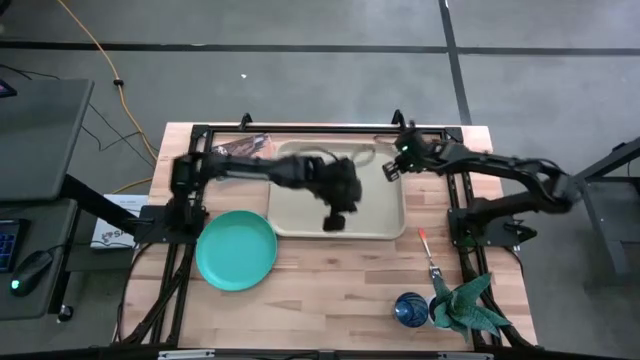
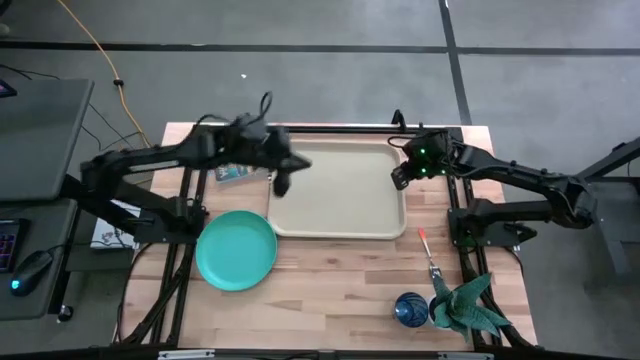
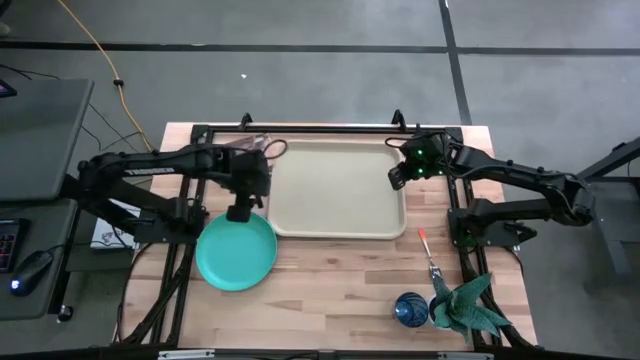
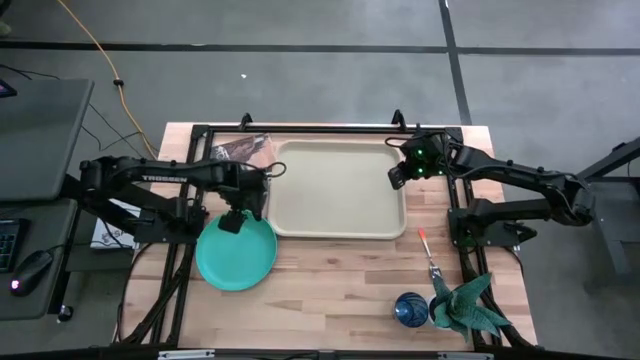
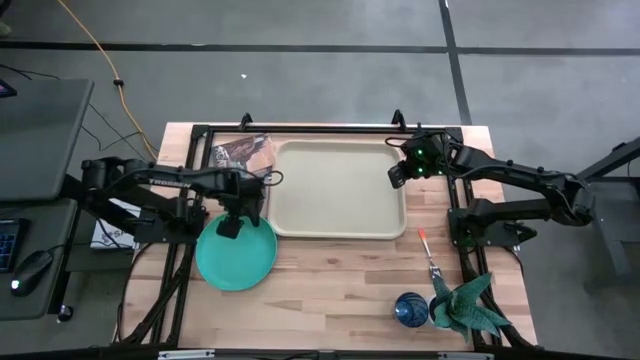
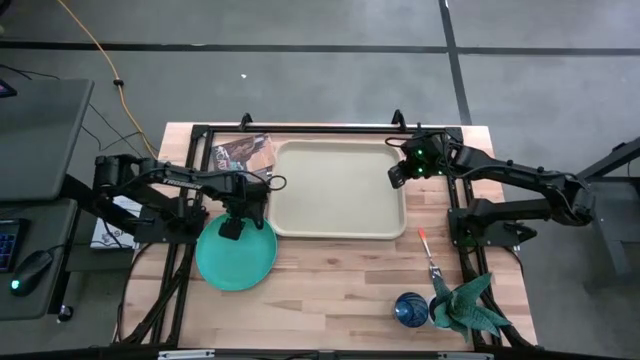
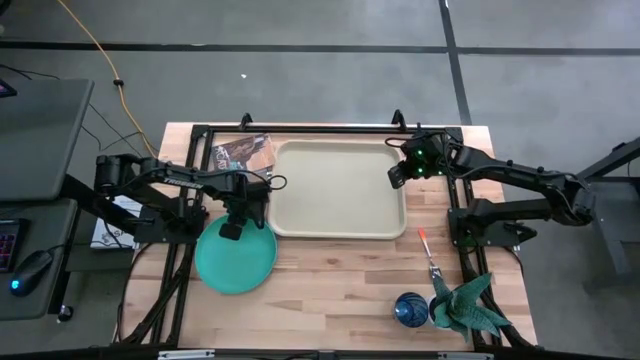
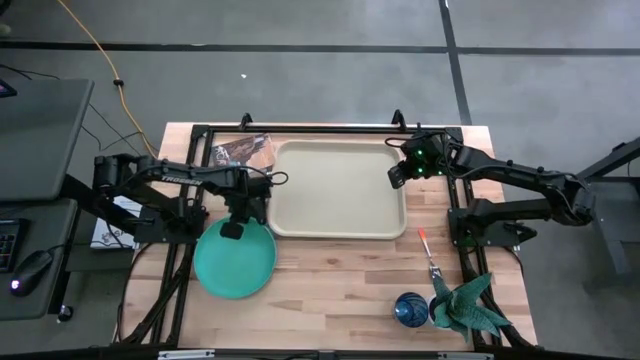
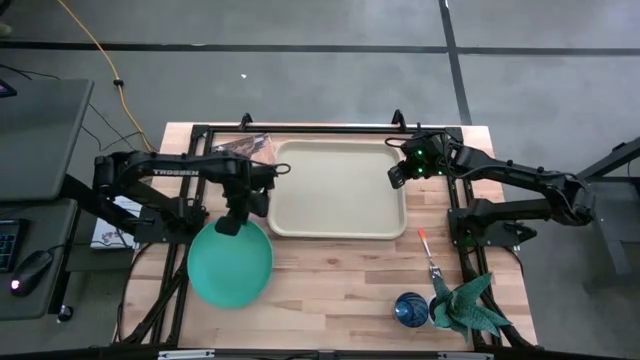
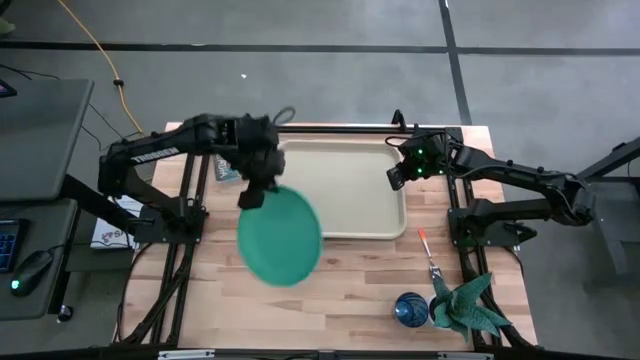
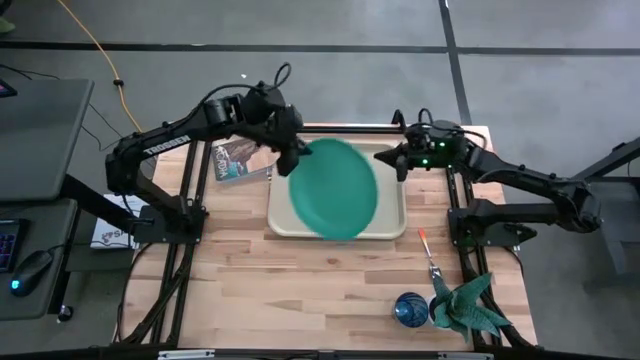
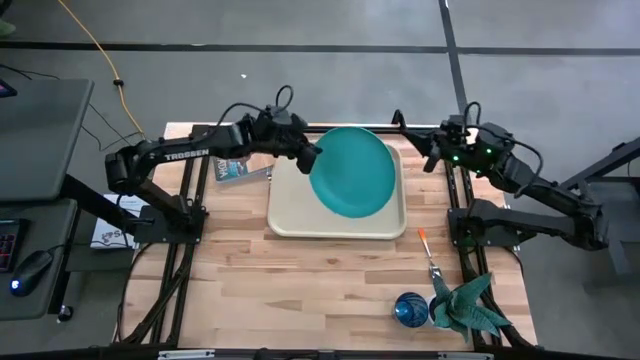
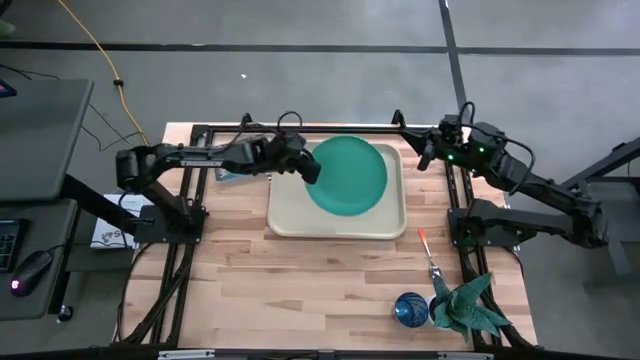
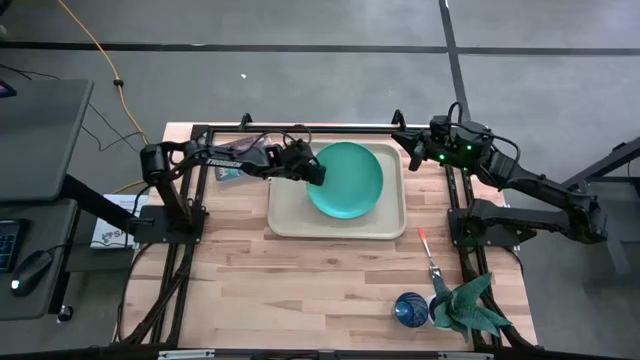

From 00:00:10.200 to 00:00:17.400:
Task: Pick and place plate/cup/fork/spoon on tray
Put the blue plate on the gray tray

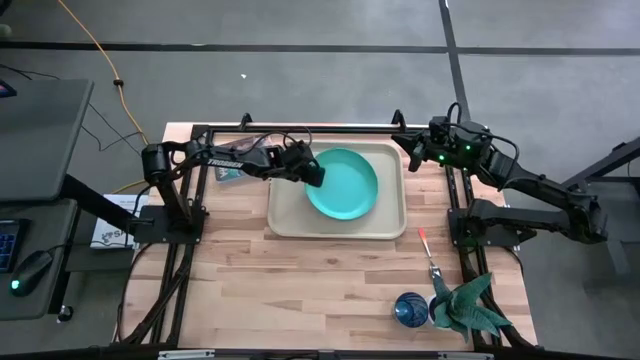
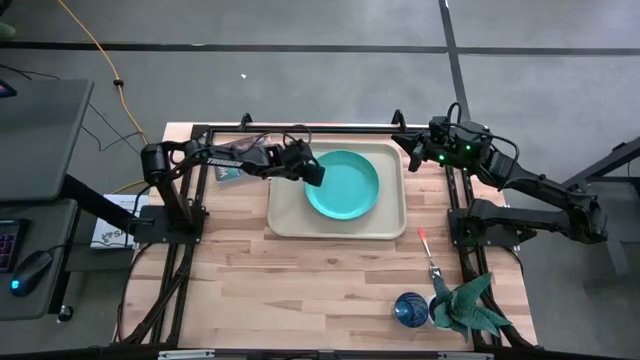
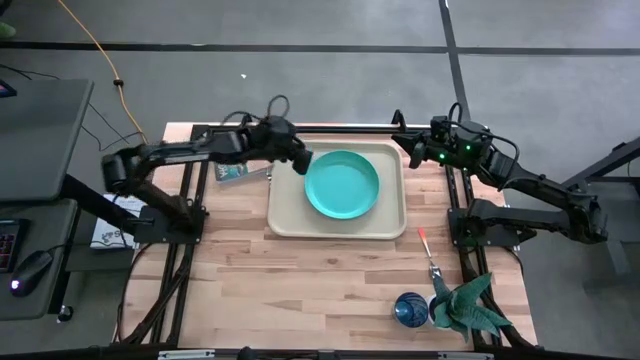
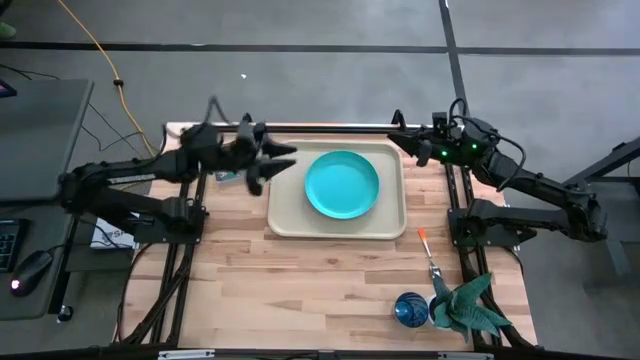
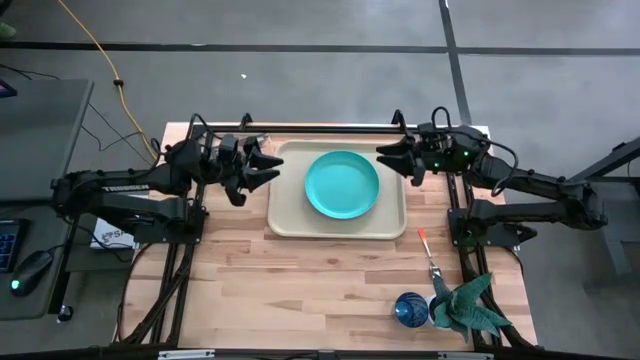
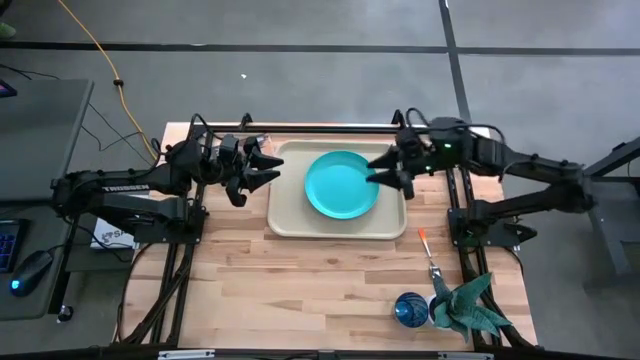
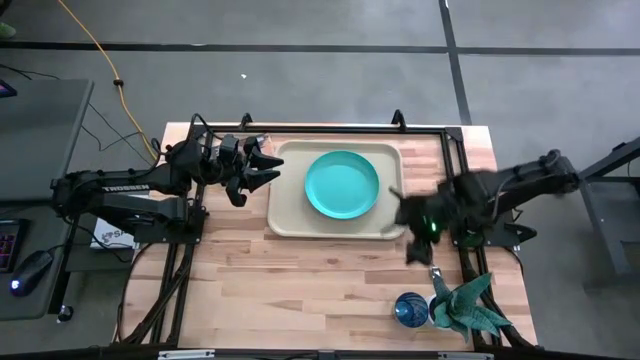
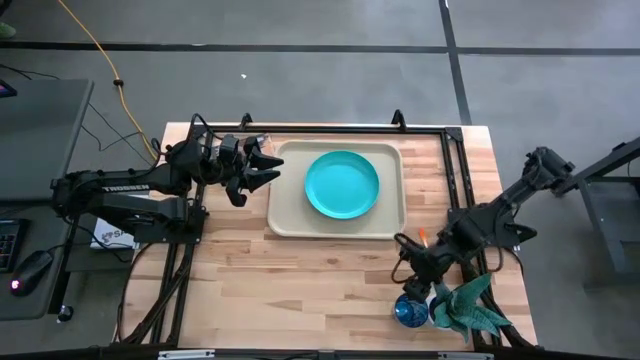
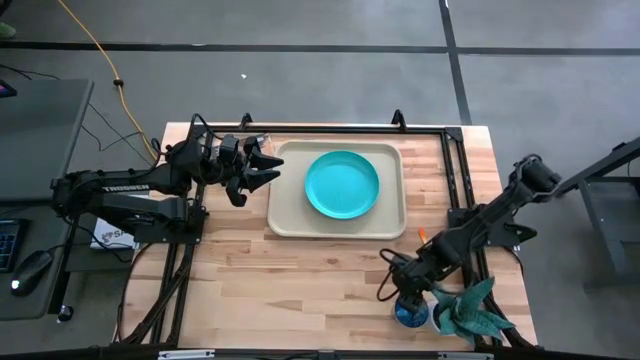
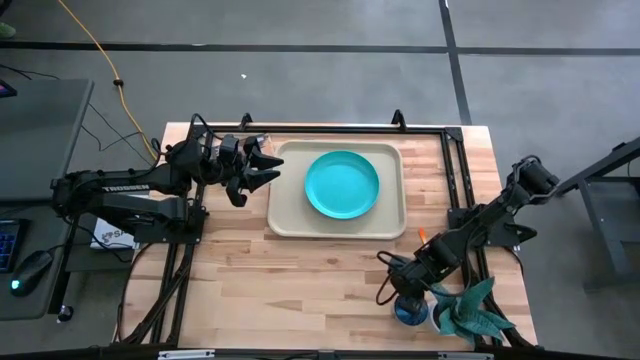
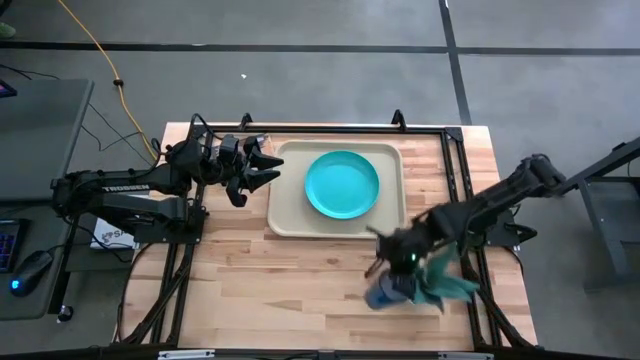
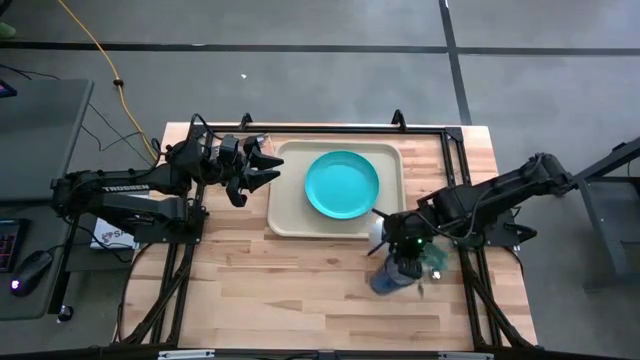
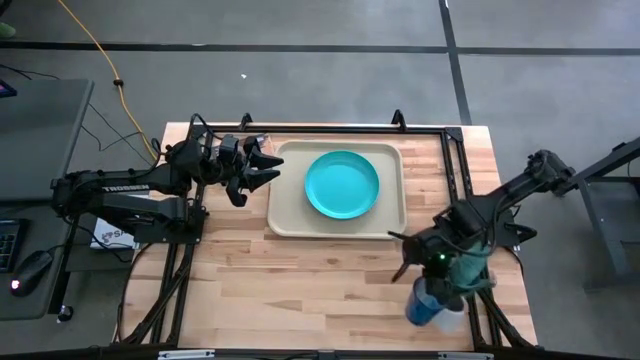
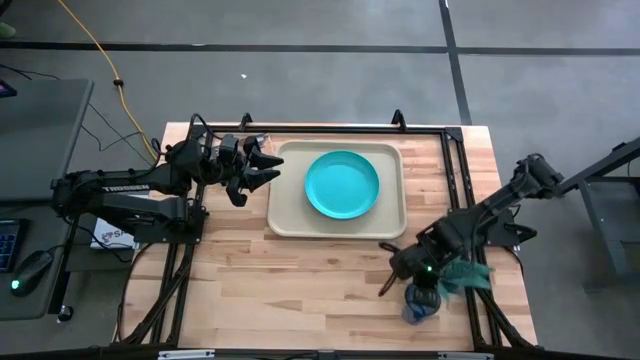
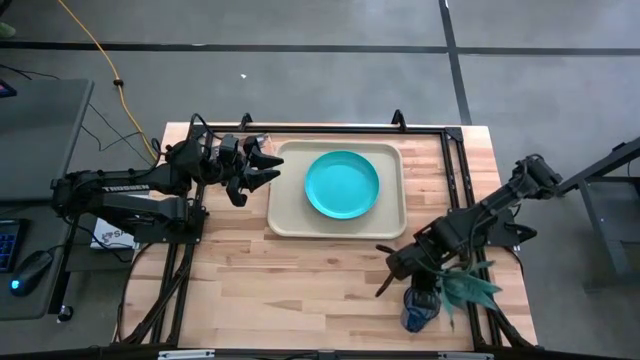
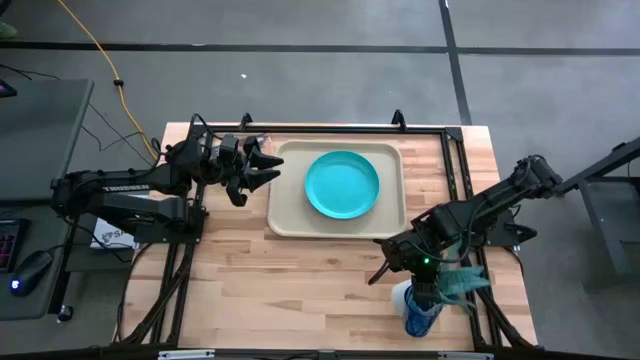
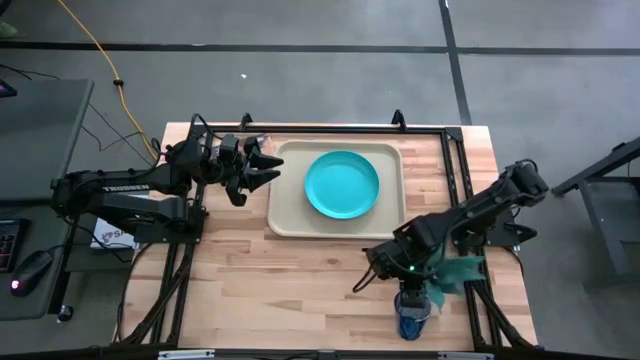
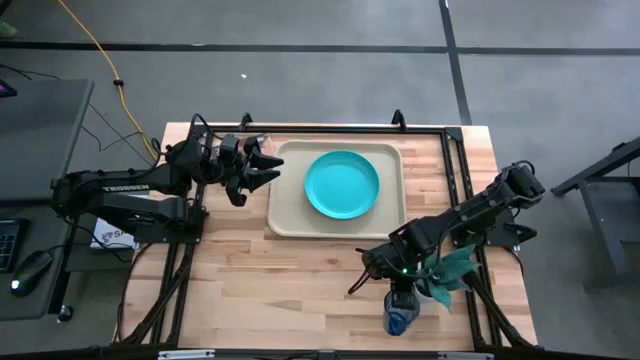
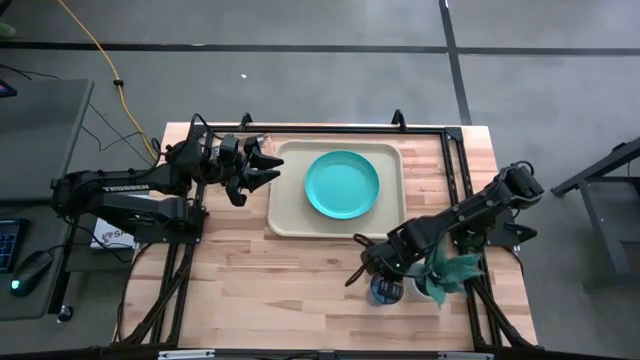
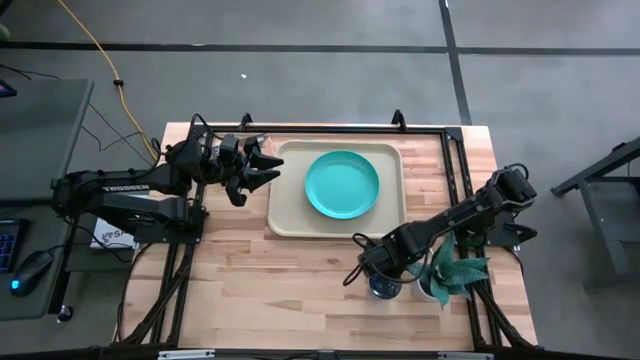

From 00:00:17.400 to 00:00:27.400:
Put the blue cup on the table

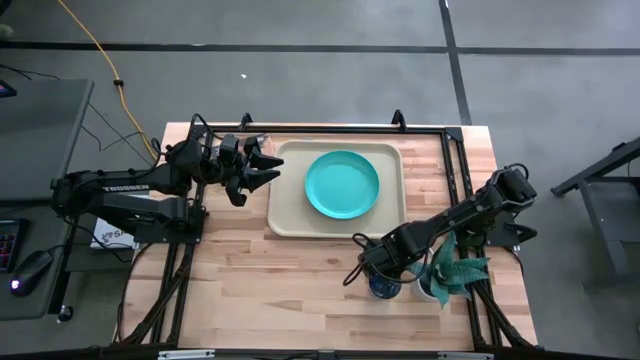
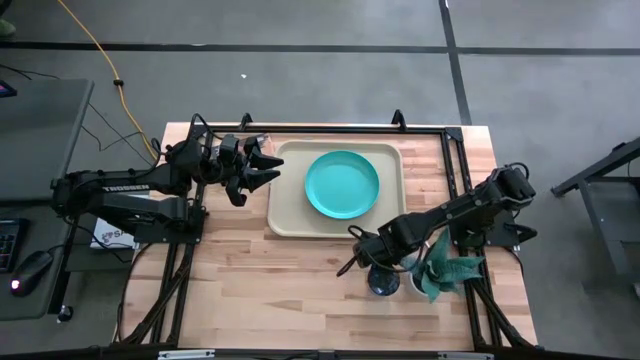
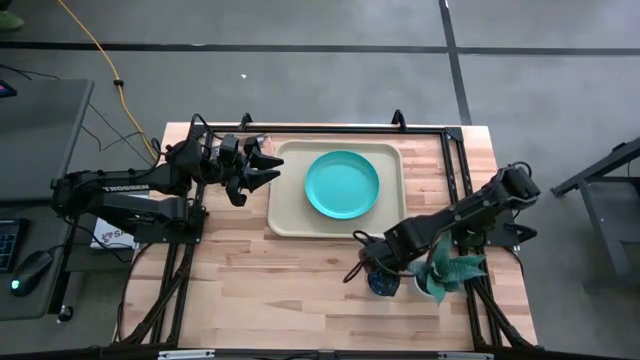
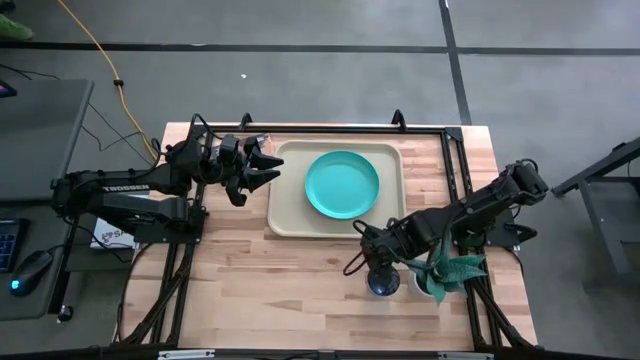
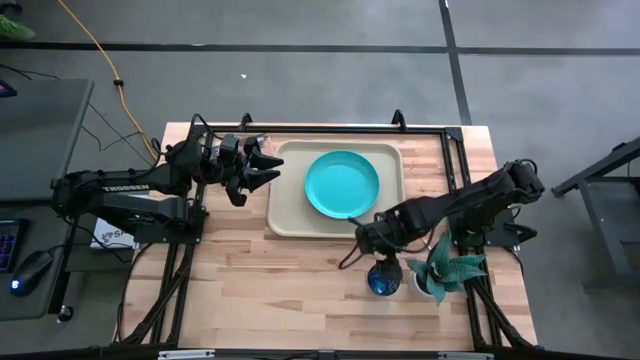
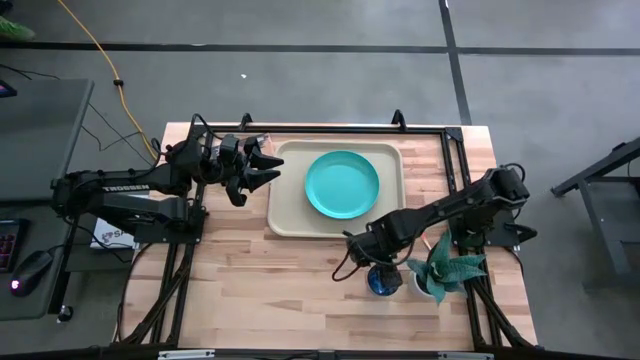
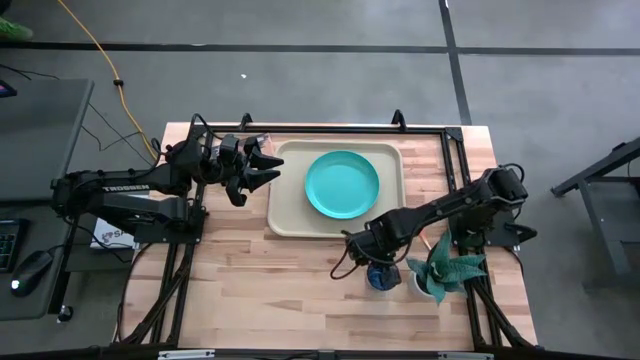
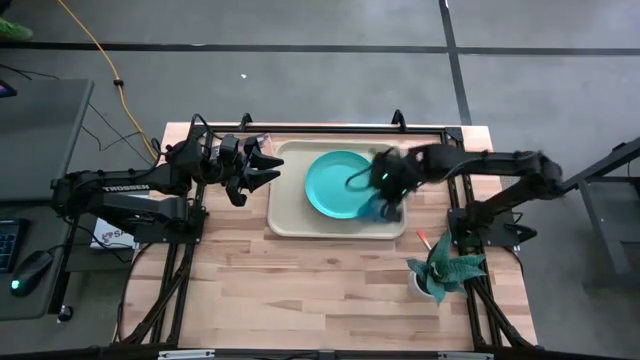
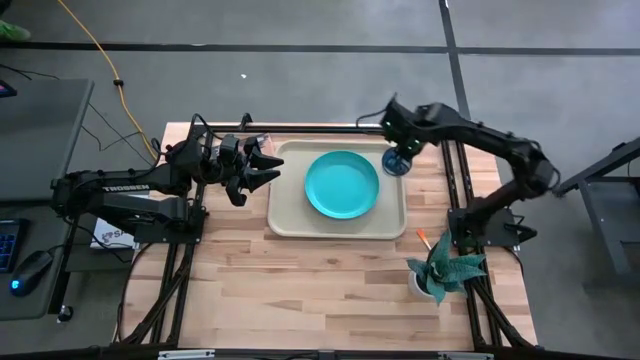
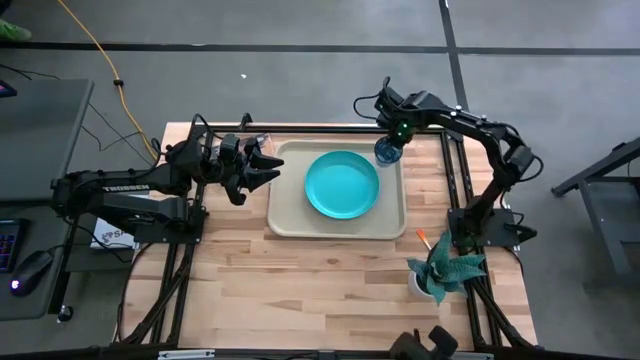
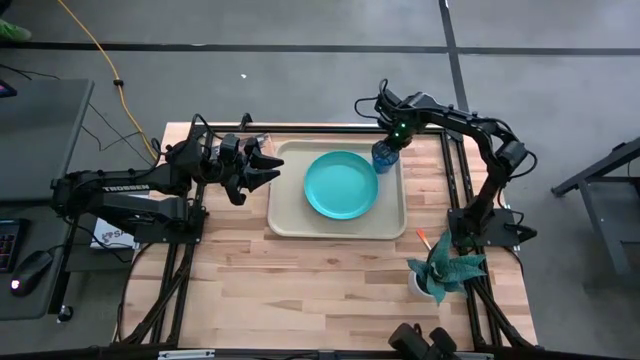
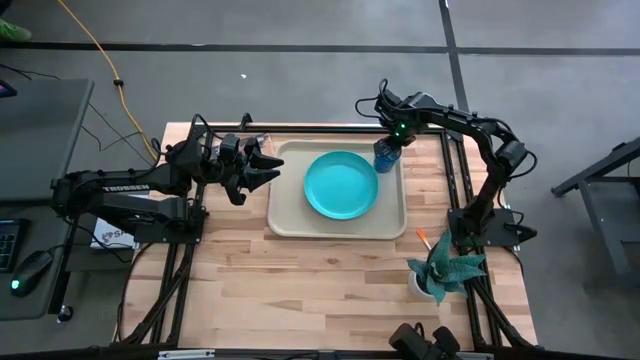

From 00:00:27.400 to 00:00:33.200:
Put the blue cup on the gray tray
